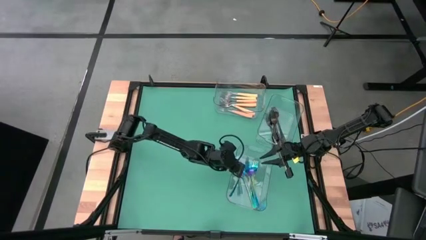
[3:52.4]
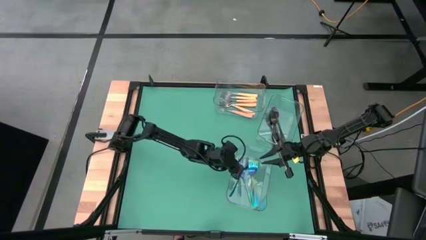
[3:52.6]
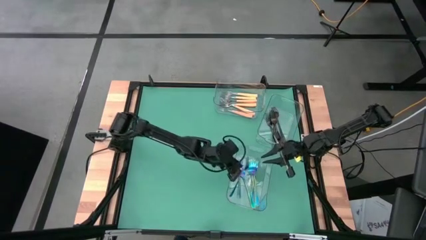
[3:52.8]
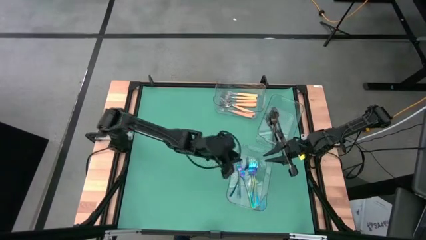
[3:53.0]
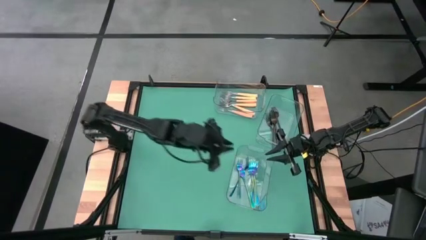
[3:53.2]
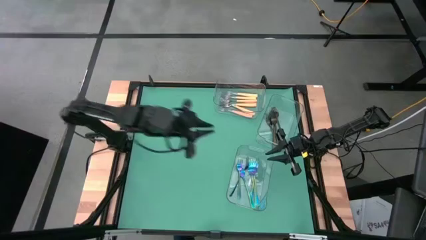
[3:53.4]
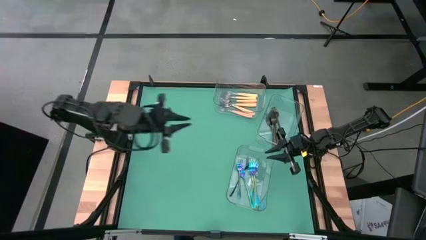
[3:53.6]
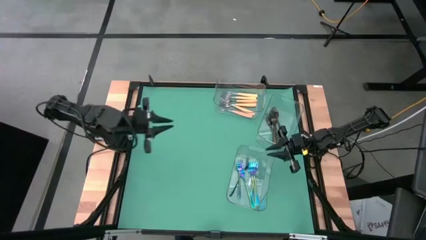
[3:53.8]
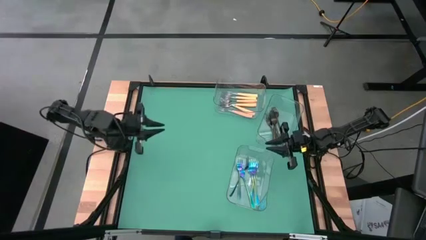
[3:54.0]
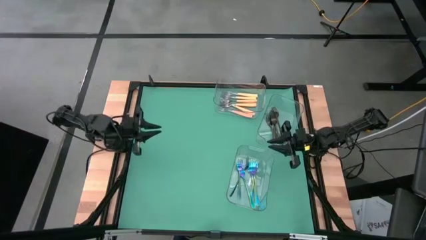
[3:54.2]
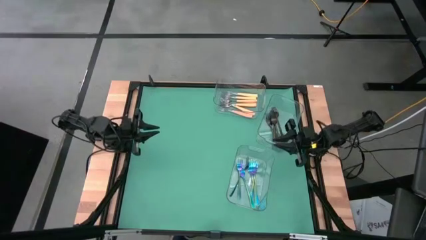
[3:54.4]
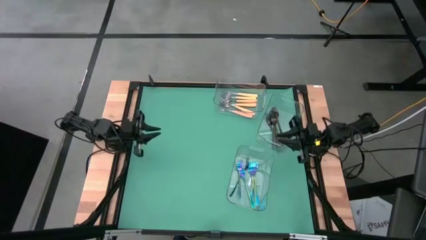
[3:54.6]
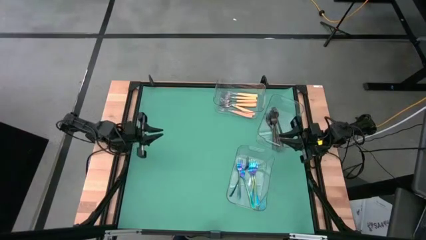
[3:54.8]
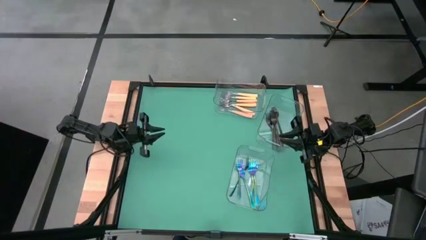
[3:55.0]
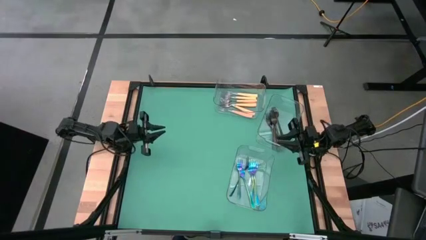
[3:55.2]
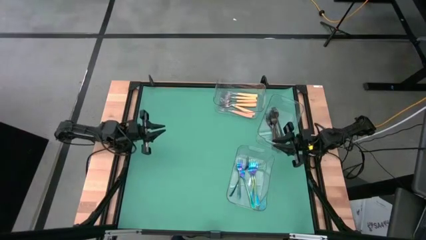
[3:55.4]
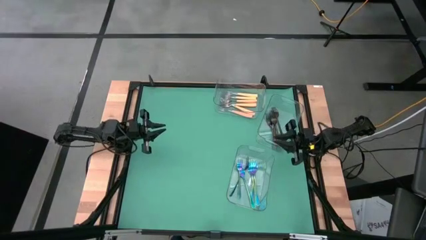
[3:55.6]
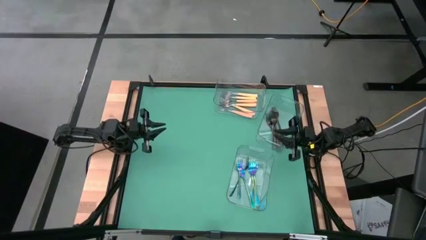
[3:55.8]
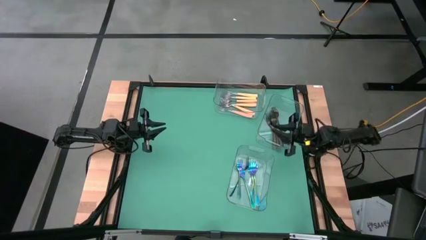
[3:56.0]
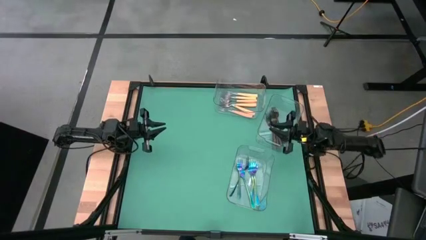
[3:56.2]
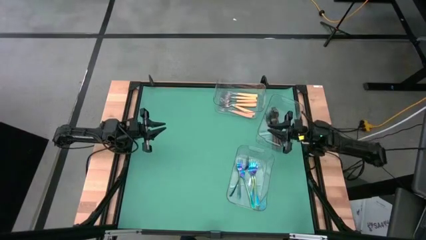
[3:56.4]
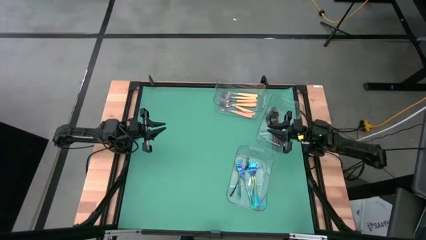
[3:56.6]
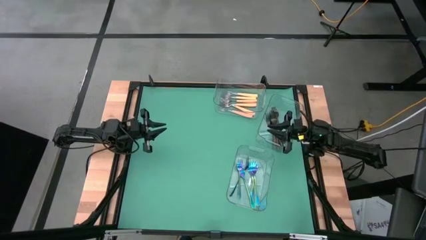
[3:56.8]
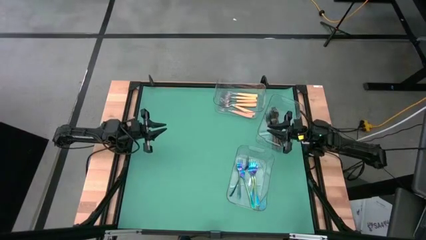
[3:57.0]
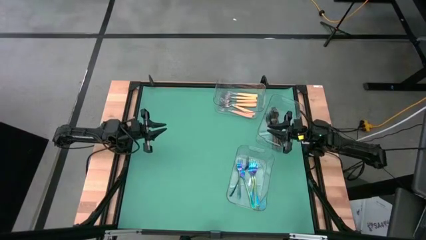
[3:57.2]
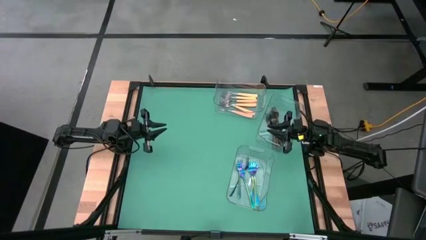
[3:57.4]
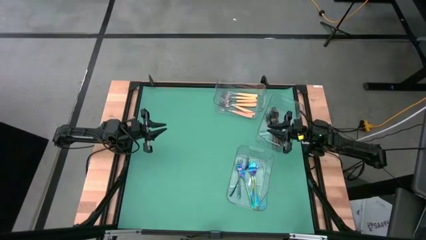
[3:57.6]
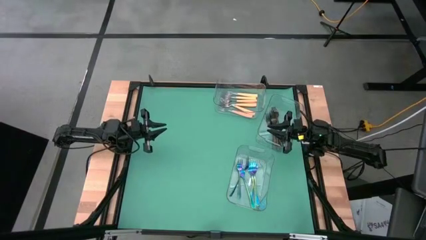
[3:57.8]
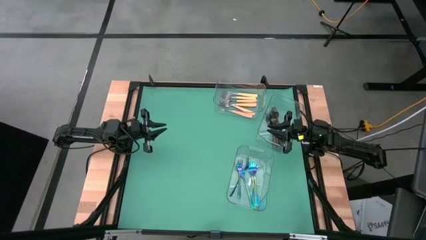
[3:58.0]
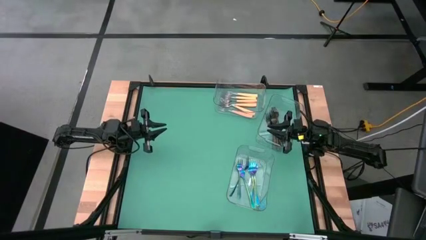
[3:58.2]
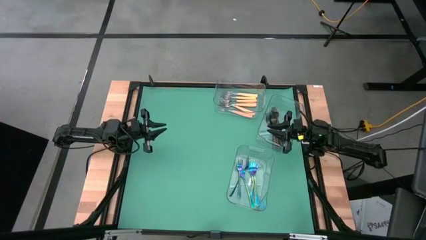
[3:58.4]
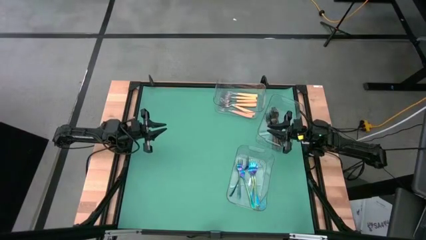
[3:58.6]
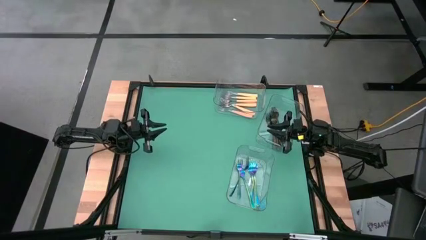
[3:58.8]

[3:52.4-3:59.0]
Task: Sort silverware by color (type)
Return to Home Position

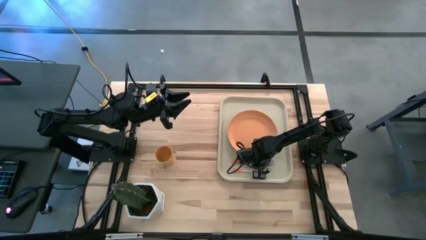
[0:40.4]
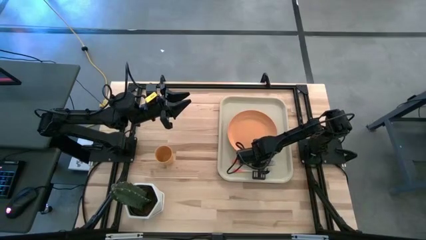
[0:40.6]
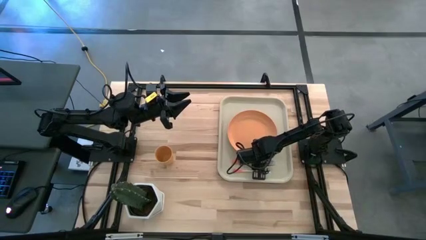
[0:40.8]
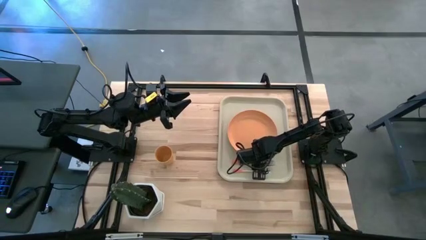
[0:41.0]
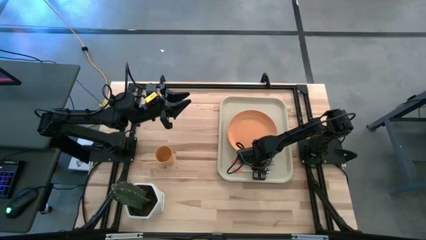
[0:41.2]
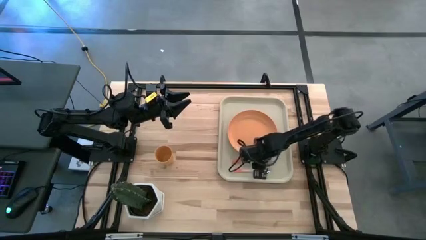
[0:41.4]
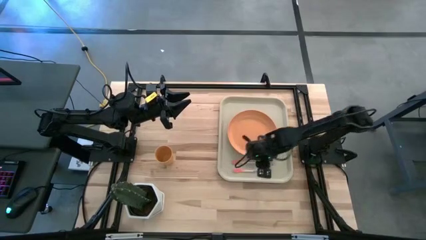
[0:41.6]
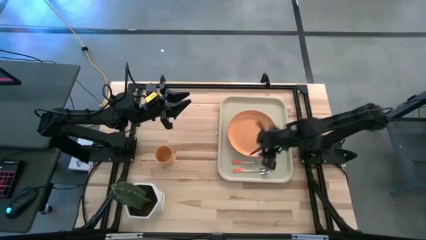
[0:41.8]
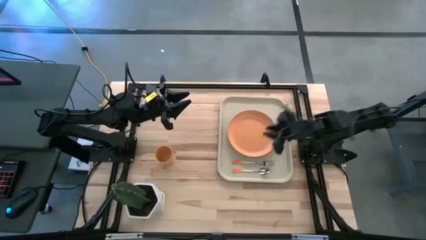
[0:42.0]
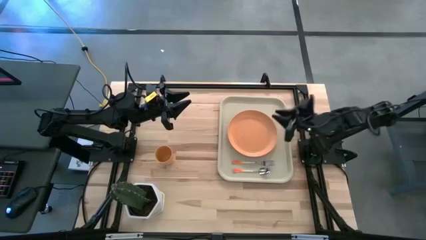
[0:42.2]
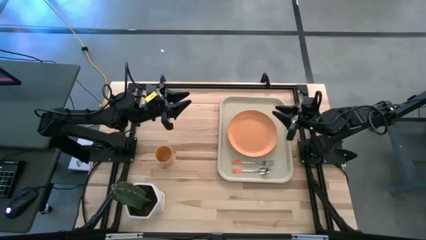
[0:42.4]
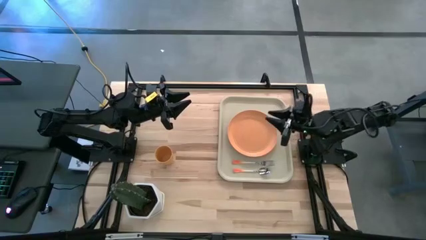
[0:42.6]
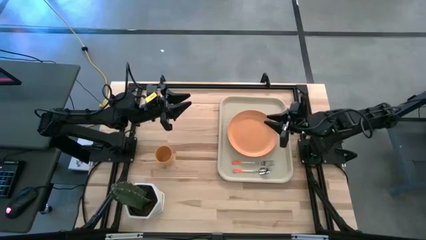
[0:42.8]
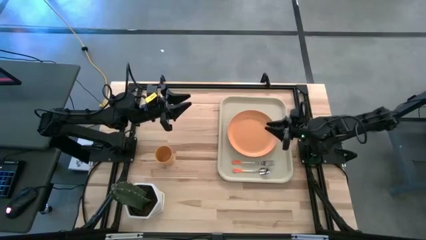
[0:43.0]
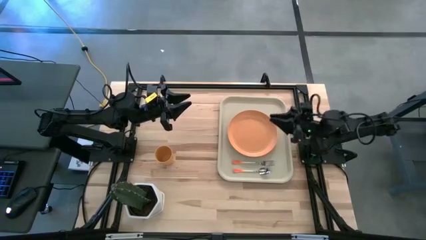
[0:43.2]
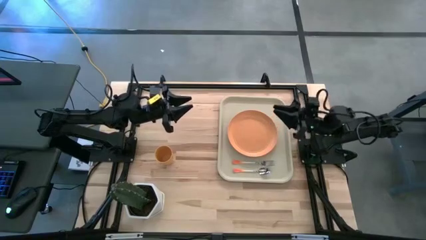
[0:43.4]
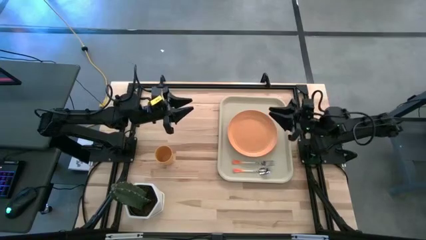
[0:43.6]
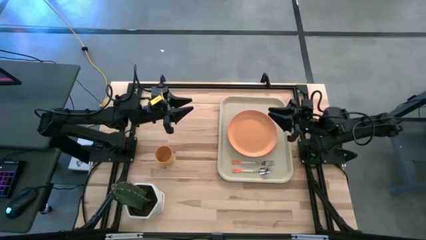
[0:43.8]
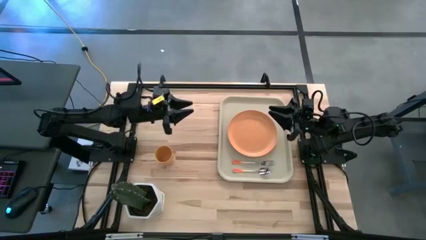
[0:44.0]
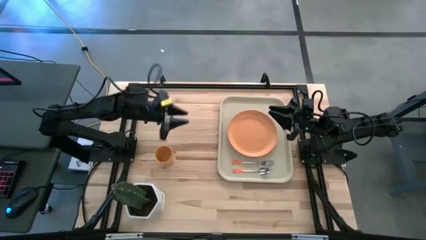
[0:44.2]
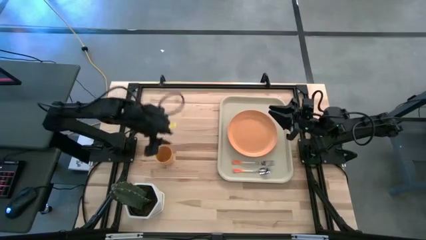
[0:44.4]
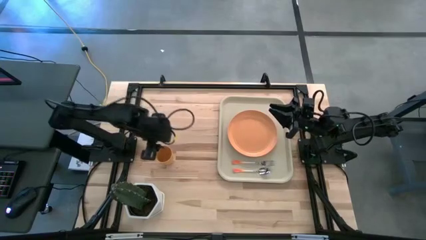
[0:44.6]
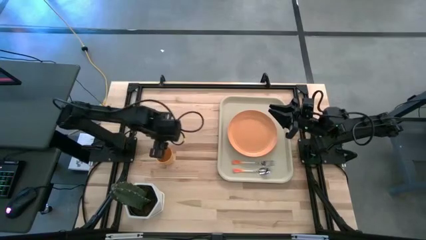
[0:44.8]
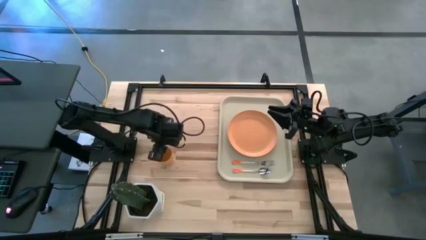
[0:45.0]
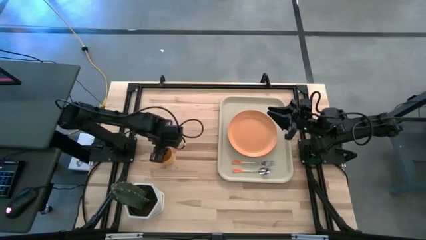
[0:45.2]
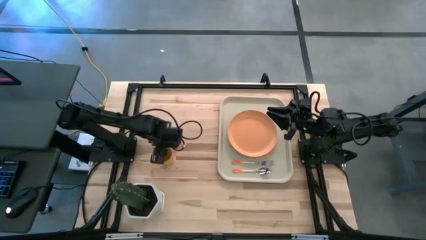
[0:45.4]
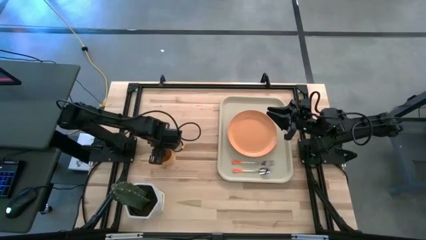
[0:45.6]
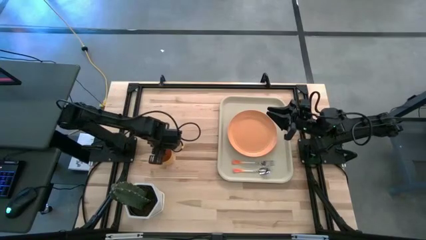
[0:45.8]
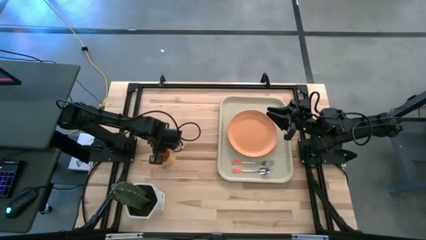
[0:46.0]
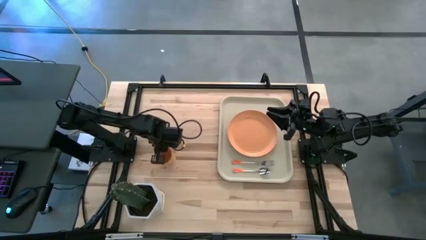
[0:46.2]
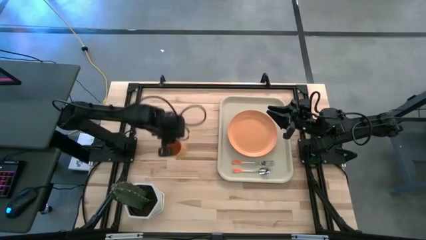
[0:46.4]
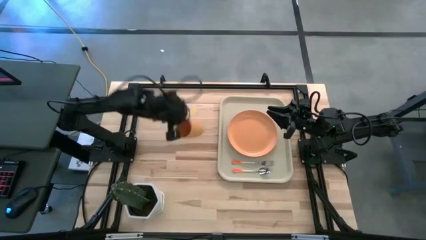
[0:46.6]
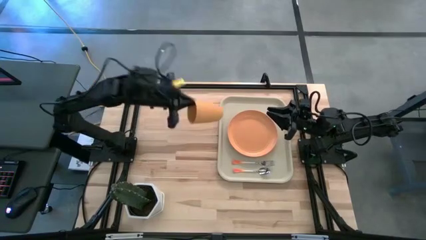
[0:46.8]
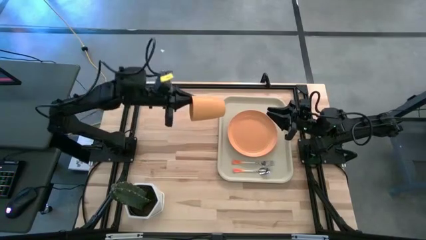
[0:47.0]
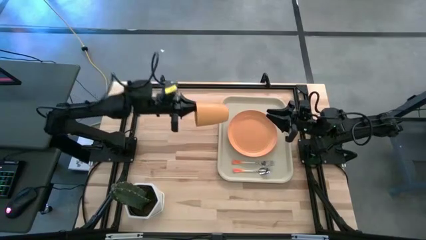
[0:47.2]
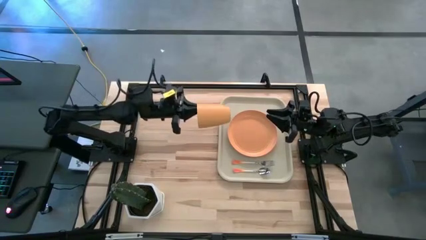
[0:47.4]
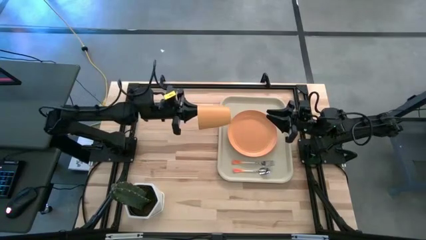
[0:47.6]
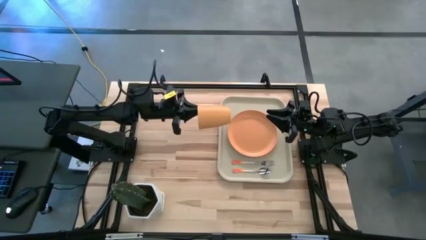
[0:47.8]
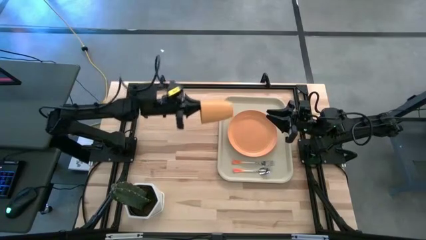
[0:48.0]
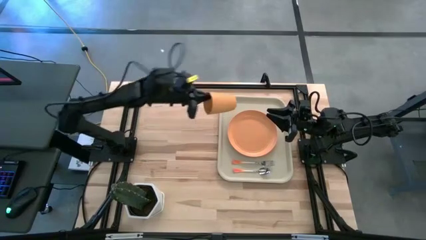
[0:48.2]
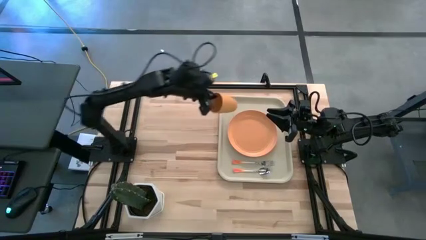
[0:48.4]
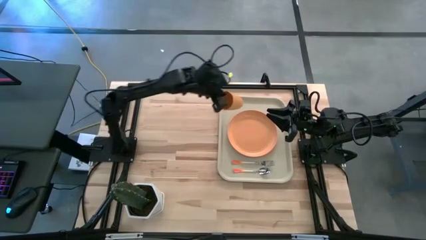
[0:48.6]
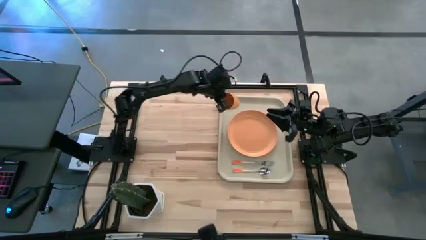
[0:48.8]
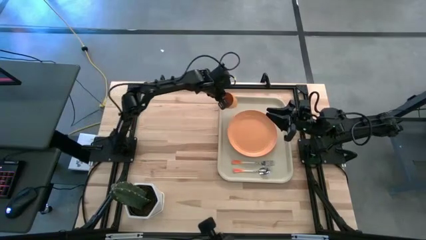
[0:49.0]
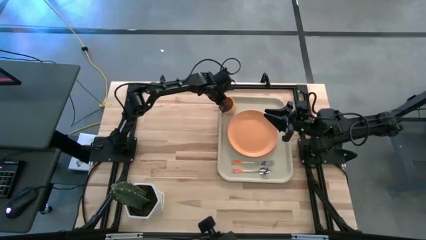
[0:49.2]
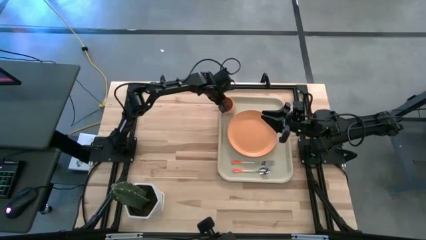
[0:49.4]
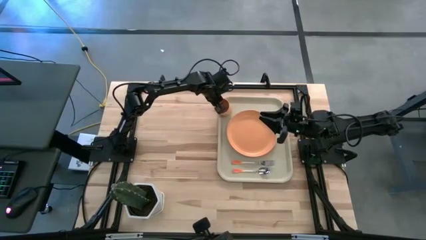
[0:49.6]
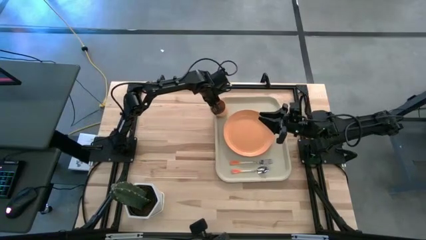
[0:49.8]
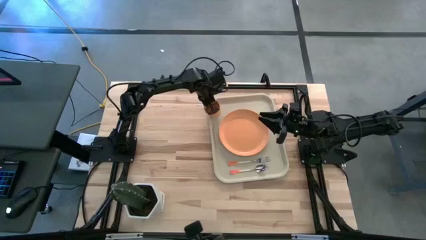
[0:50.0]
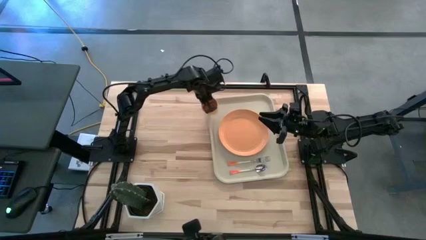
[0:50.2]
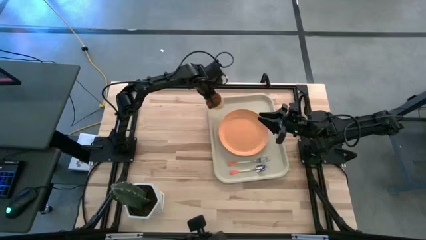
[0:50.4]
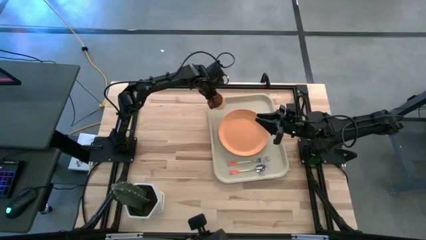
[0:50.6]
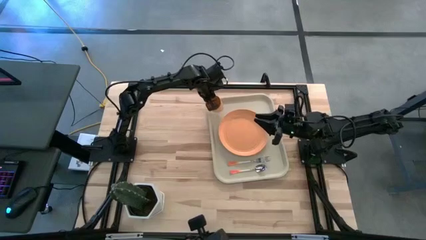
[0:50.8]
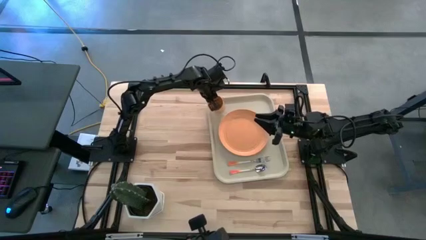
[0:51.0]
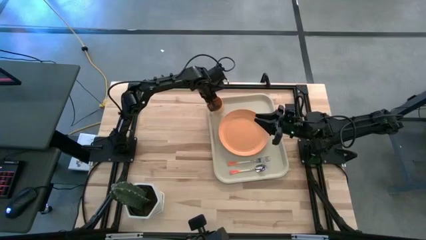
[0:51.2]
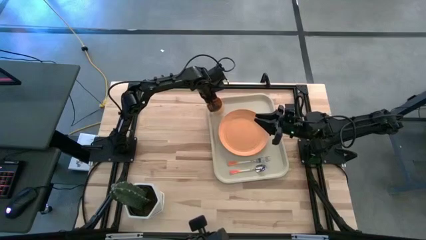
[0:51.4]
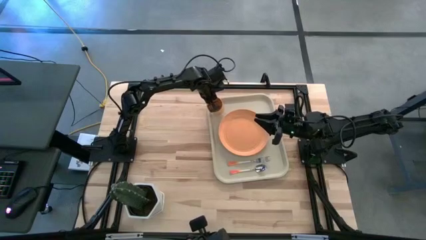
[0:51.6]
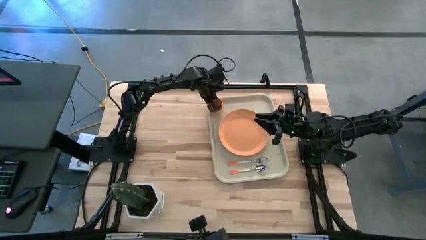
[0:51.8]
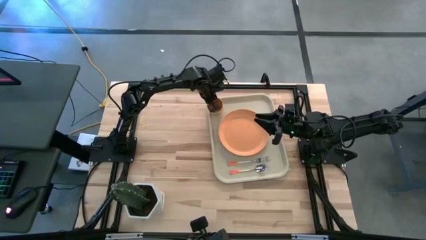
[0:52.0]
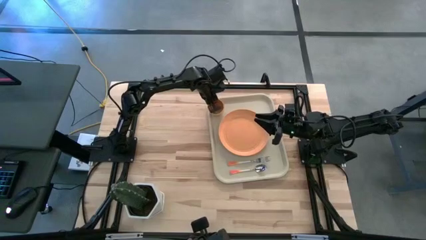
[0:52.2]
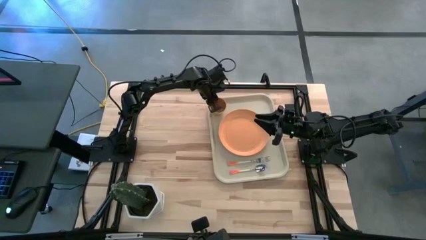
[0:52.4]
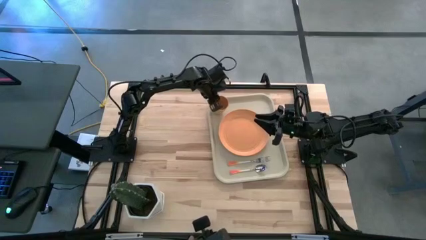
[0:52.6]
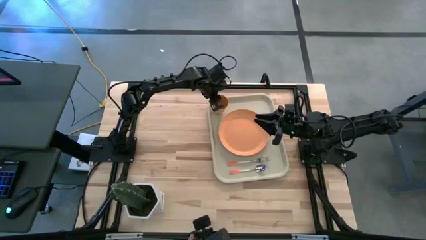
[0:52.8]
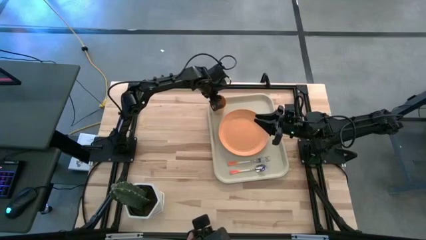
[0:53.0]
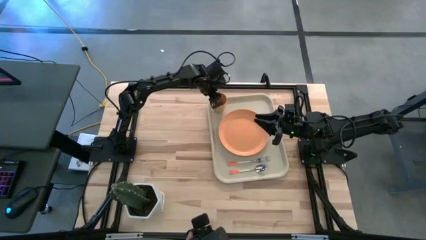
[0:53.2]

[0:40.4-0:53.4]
Task: Pick and place plate/cup/fork/spoon on tray
Put the orange cup on the beige serving tray above the orange plate
